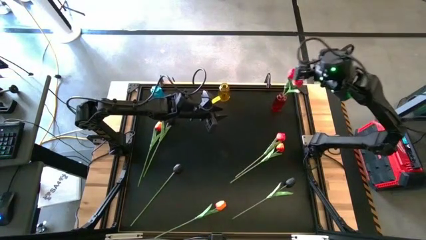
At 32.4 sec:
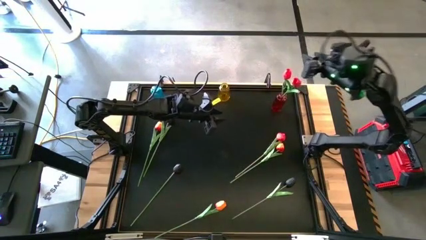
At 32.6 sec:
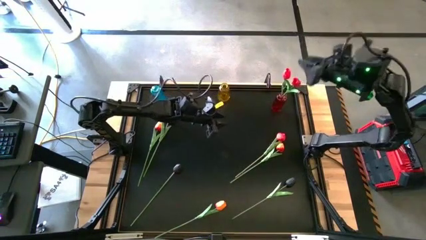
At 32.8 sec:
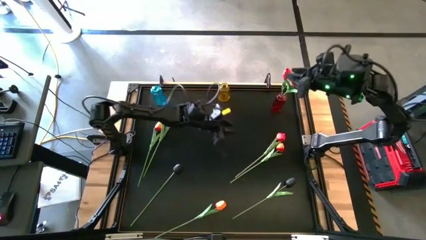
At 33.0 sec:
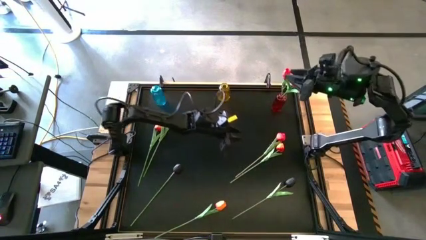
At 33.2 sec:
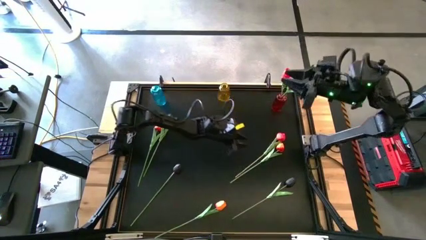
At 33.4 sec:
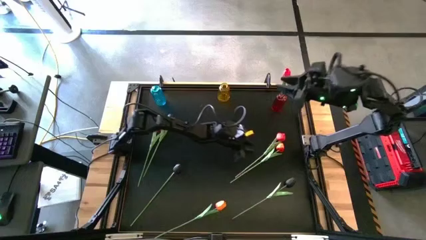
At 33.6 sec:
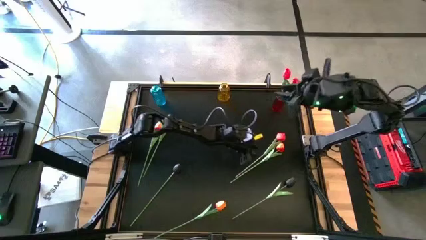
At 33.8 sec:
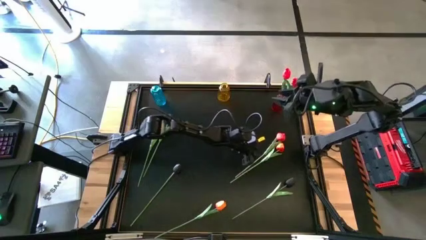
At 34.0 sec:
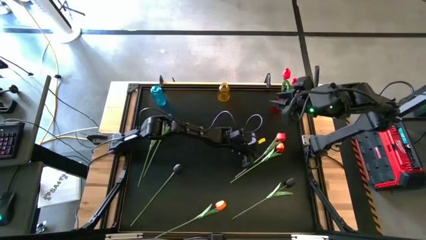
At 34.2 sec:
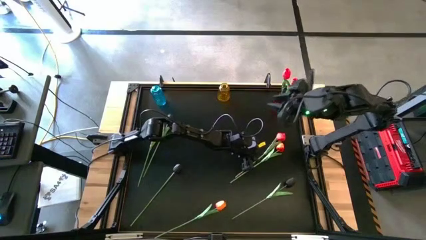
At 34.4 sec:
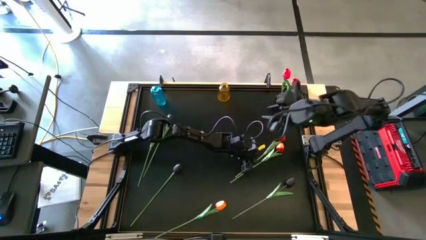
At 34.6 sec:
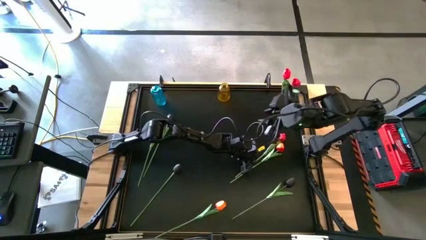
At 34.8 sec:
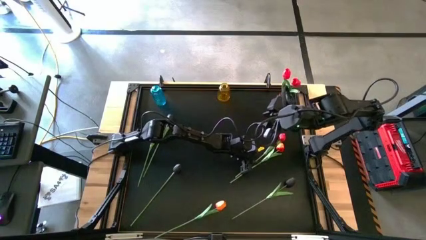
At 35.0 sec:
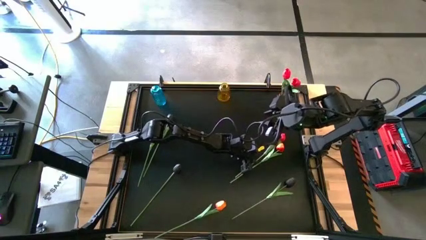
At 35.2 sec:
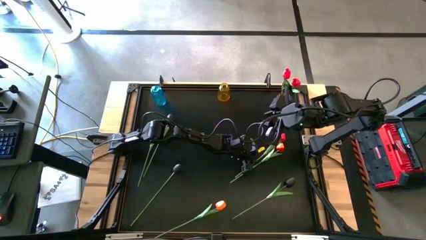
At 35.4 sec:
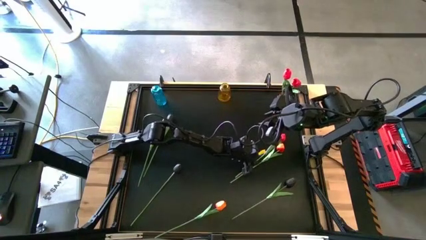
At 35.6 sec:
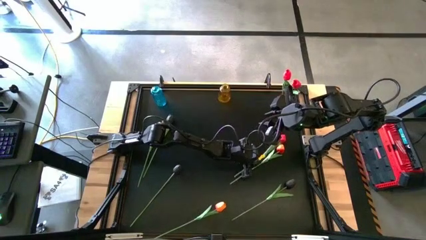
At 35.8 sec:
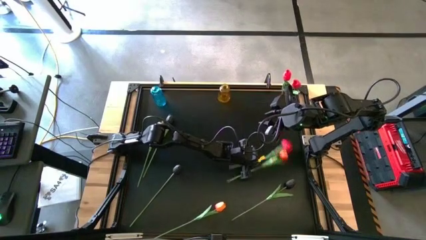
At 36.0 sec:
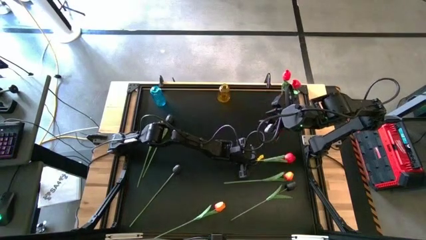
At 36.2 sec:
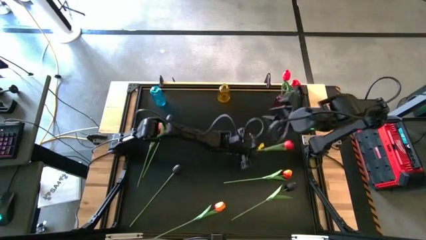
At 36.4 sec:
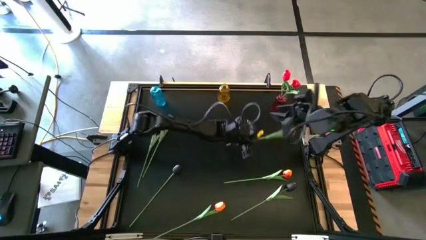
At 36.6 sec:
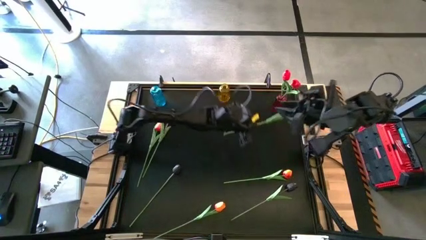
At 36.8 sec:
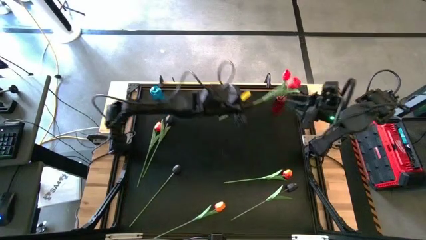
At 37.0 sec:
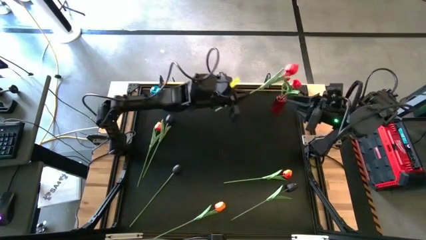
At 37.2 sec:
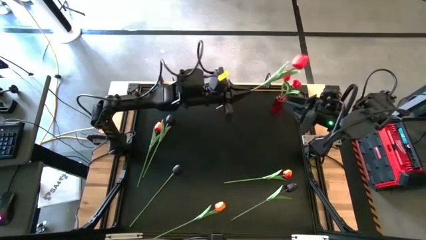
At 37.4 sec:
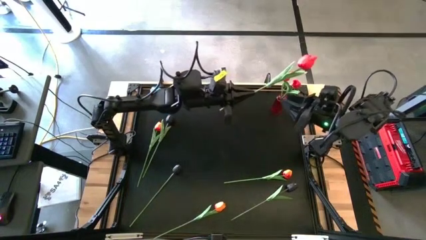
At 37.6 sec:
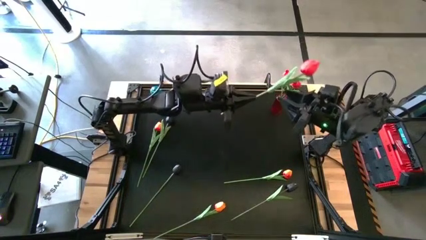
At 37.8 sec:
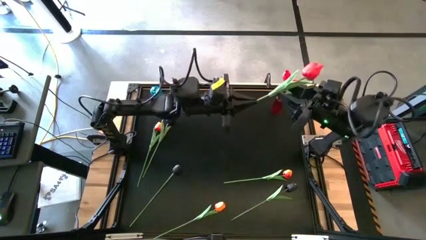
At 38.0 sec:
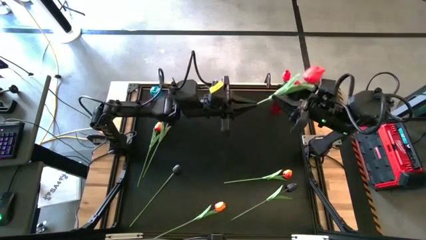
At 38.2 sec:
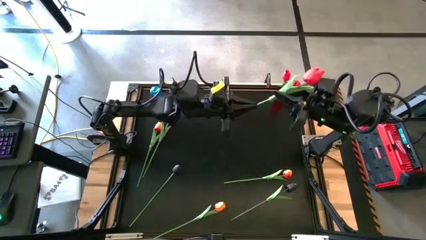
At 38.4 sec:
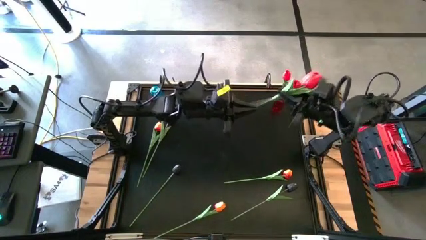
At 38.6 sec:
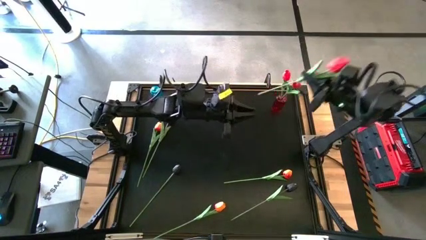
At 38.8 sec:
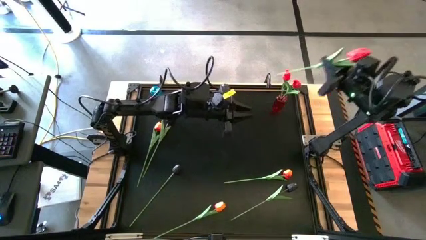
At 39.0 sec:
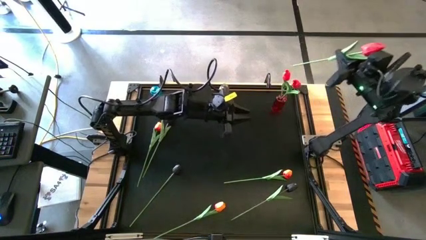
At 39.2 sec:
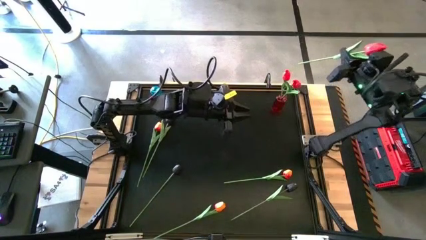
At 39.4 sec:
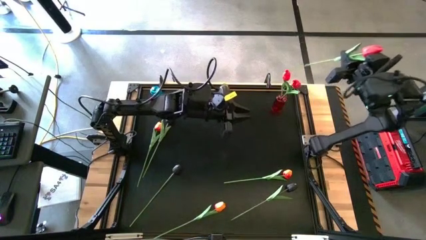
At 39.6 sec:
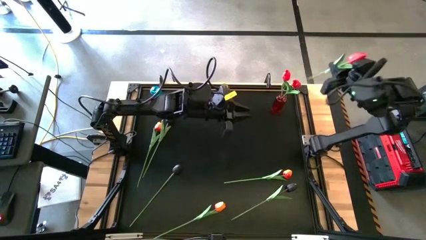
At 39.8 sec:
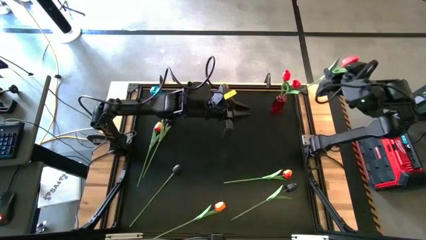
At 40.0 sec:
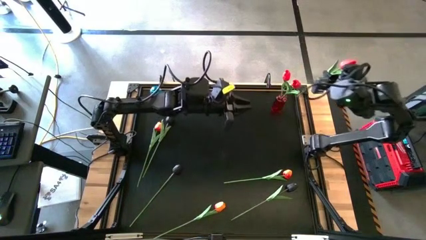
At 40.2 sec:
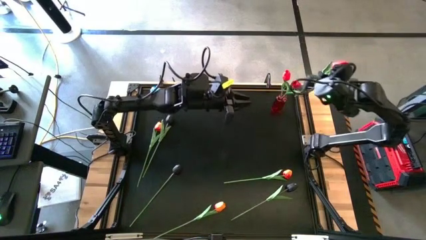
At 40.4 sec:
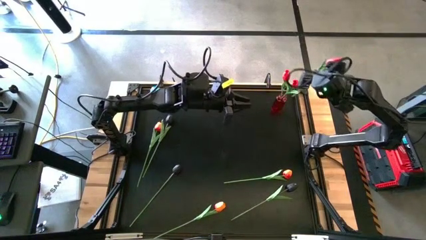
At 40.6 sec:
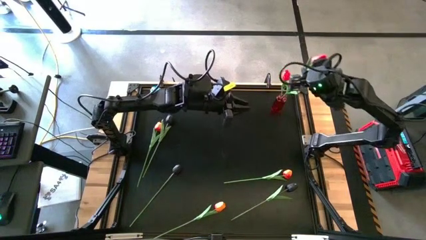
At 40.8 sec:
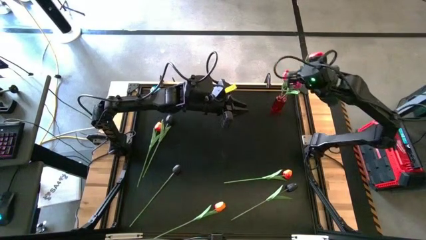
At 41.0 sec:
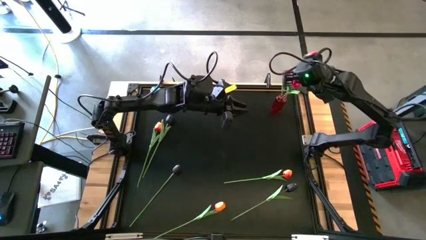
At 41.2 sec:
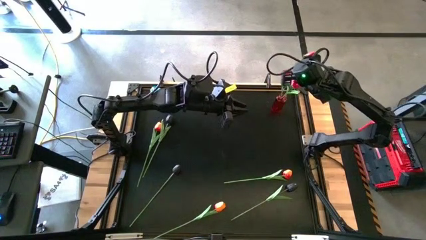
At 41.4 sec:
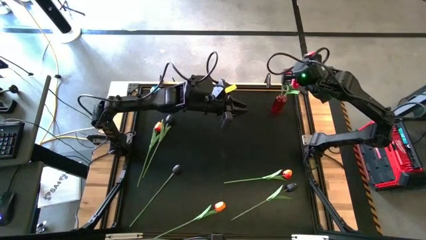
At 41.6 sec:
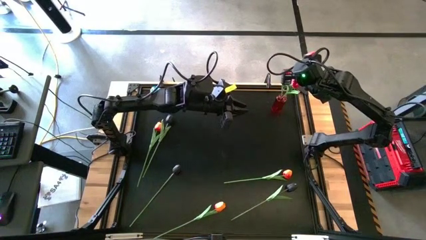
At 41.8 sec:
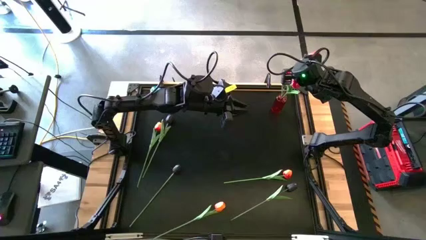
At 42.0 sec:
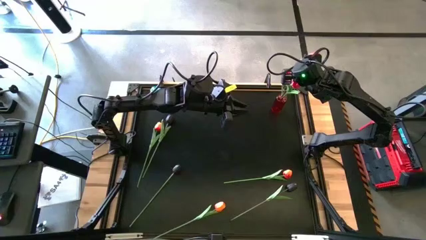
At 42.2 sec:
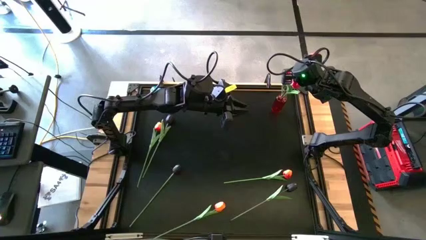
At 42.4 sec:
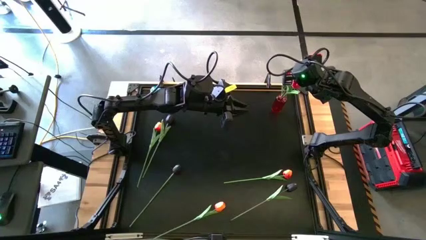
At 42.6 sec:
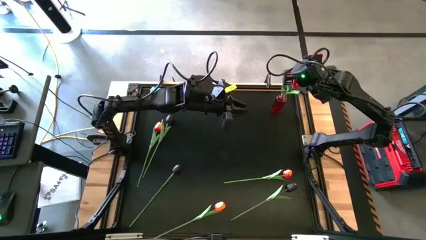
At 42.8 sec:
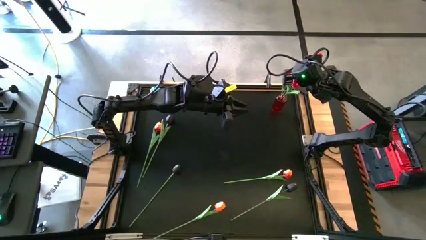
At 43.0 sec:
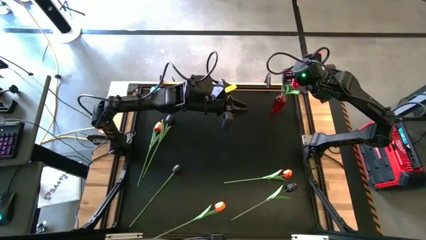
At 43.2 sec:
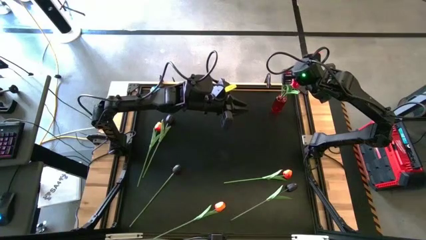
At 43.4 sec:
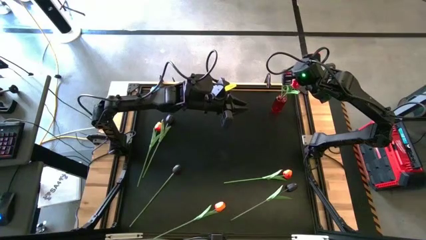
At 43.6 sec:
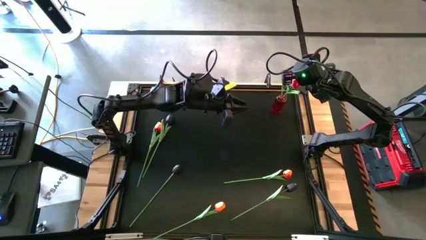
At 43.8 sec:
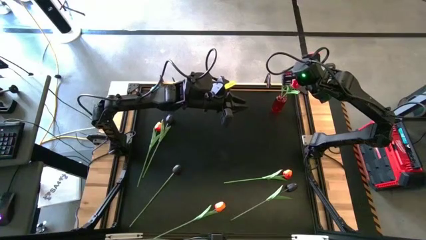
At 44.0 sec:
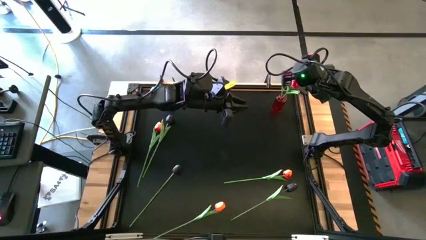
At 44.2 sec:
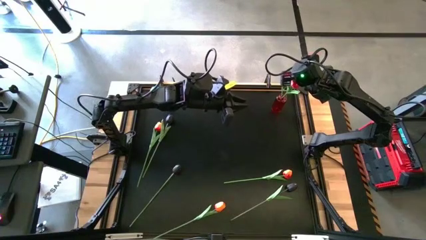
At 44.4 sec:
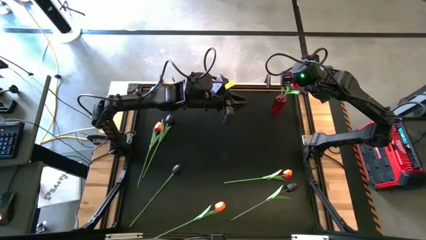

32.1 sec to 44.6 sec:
Task: Sort flowers into vase by color
Put the red flower into the red vase
